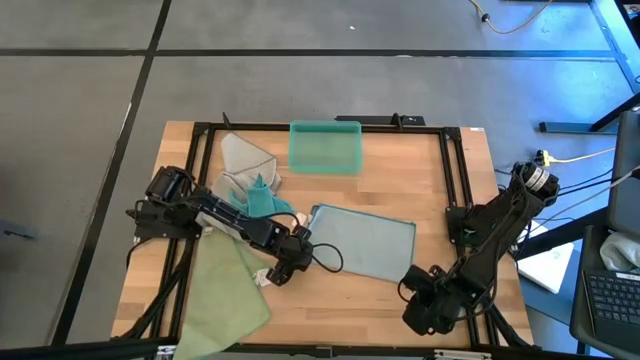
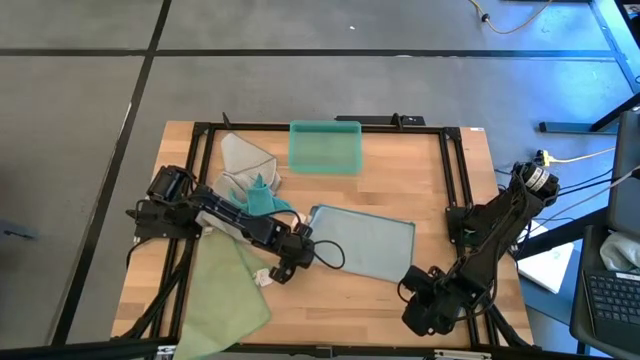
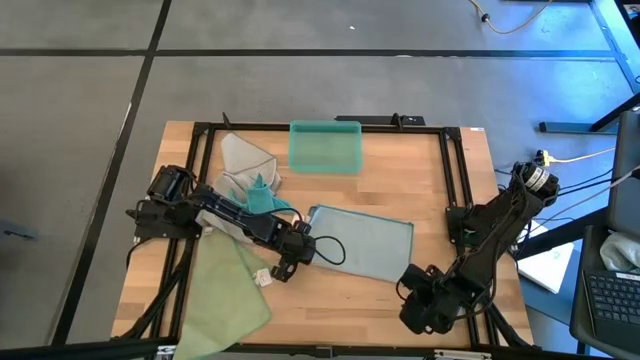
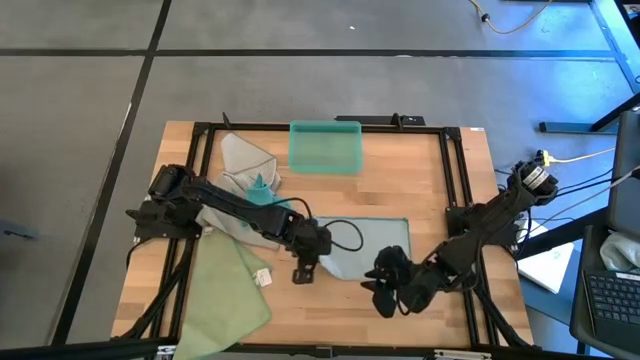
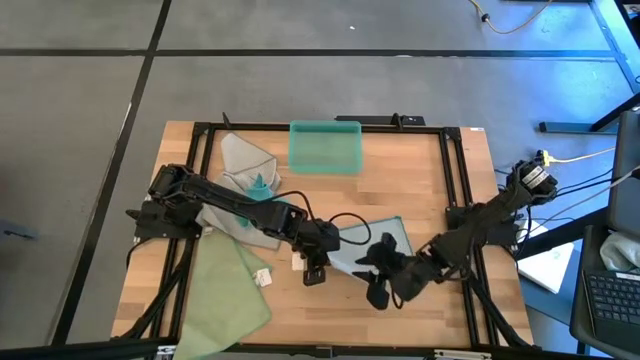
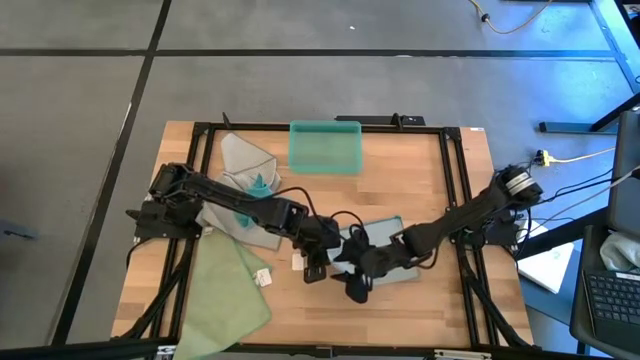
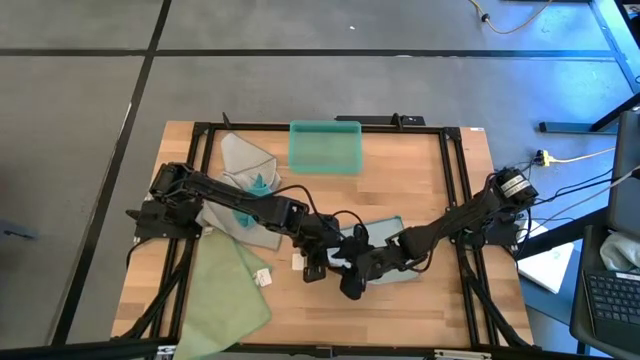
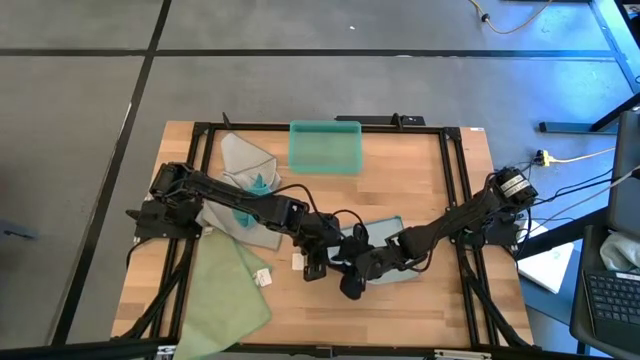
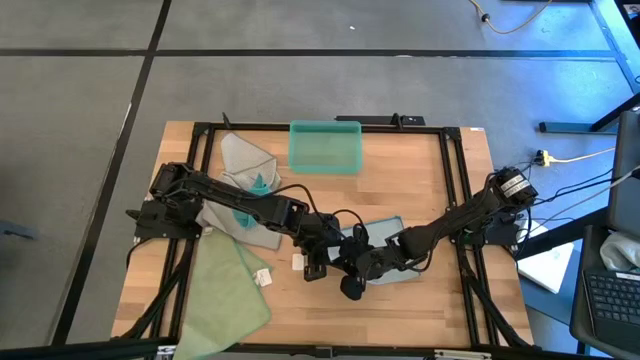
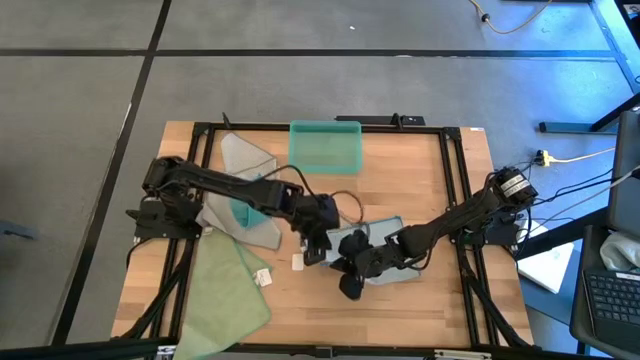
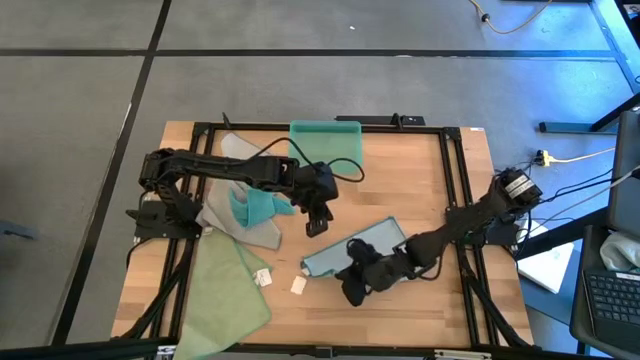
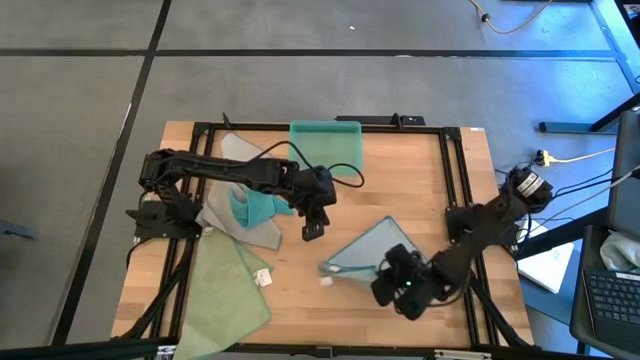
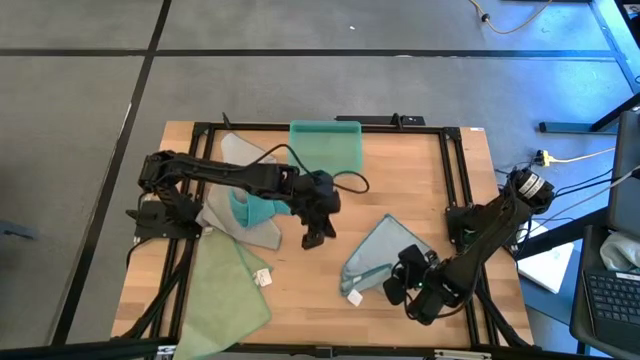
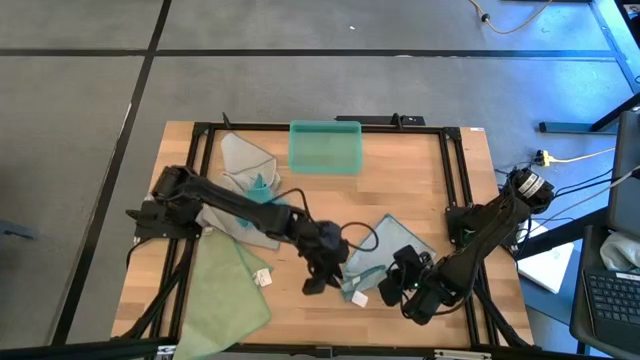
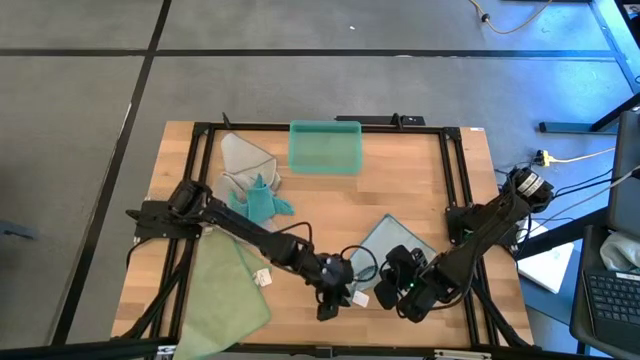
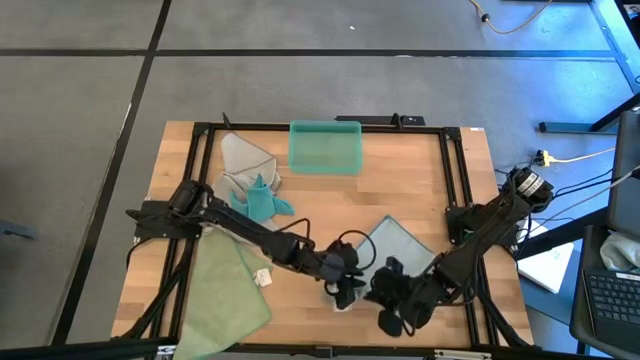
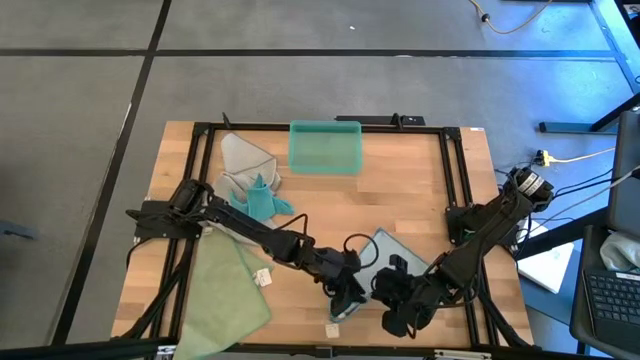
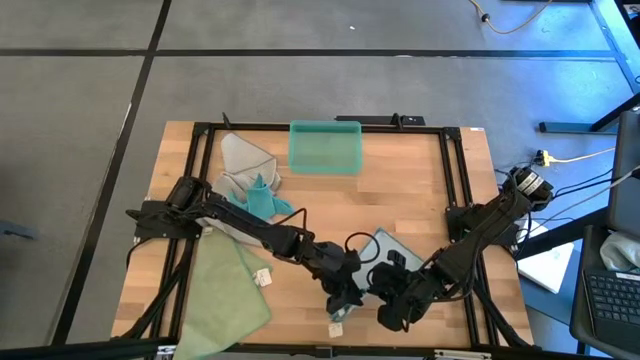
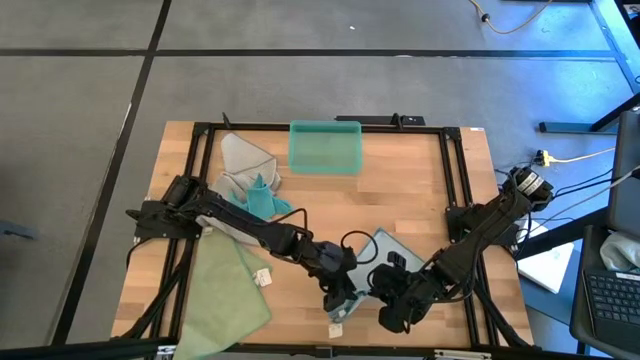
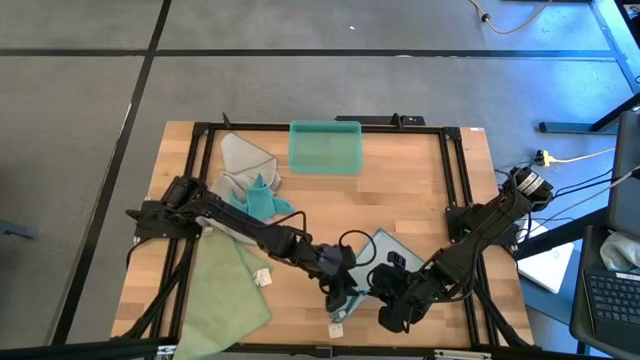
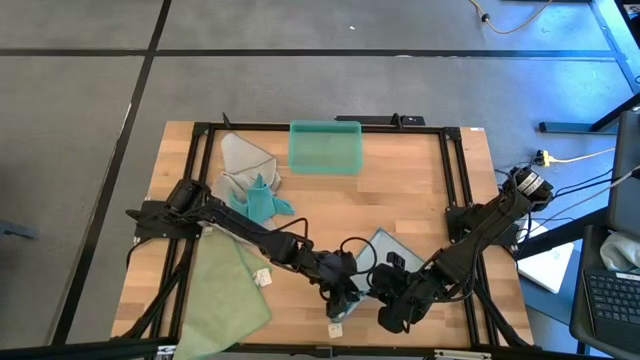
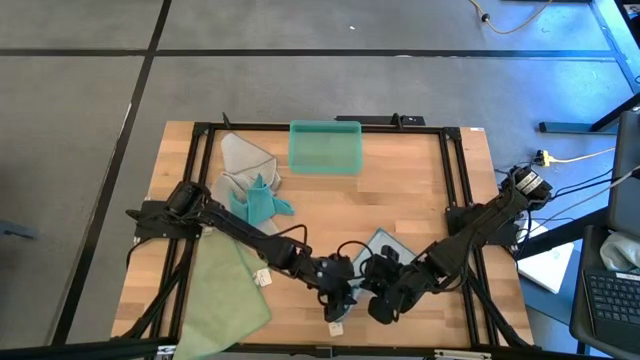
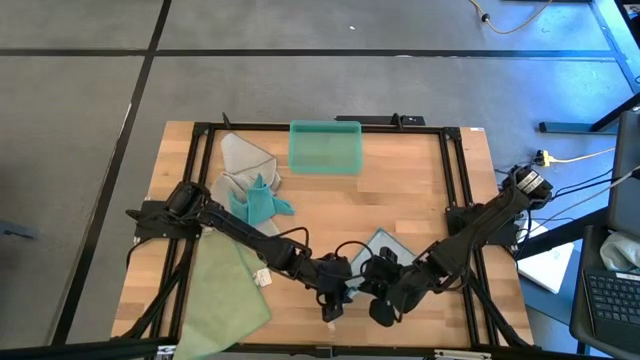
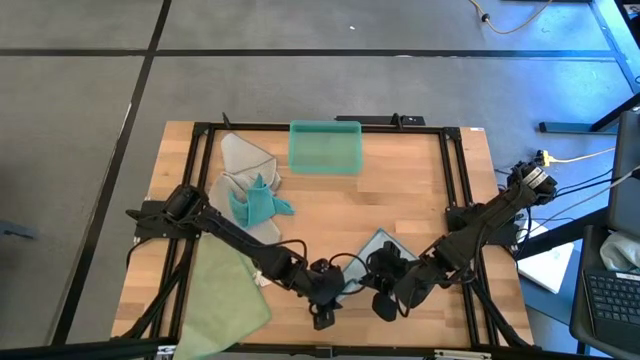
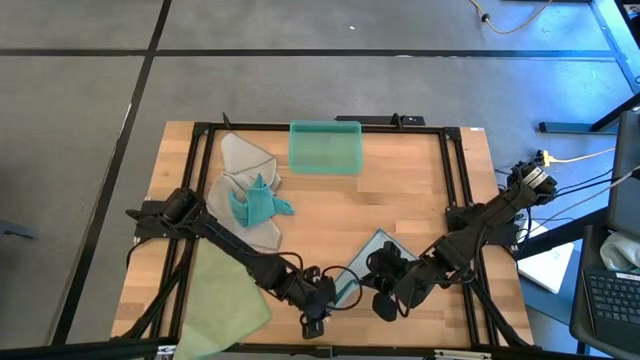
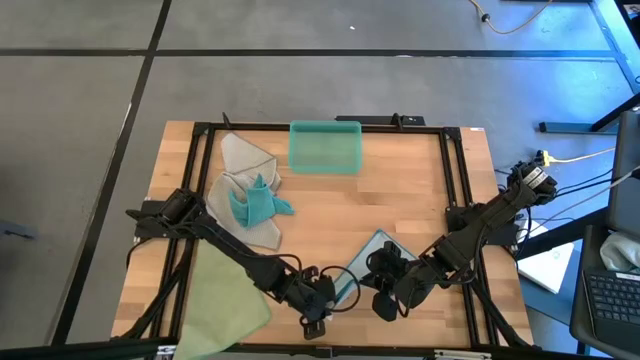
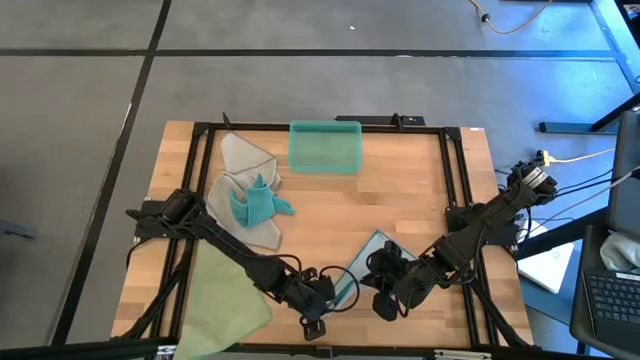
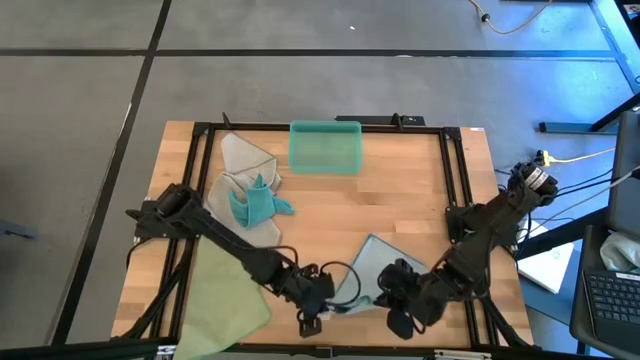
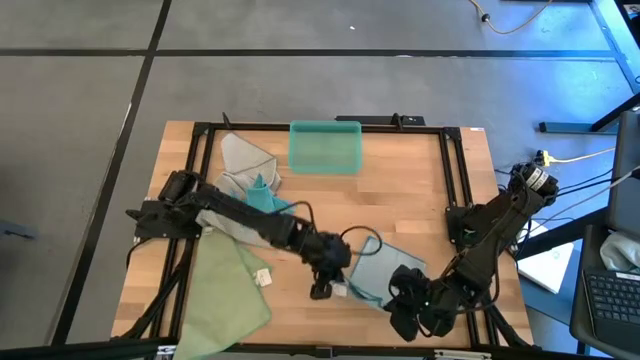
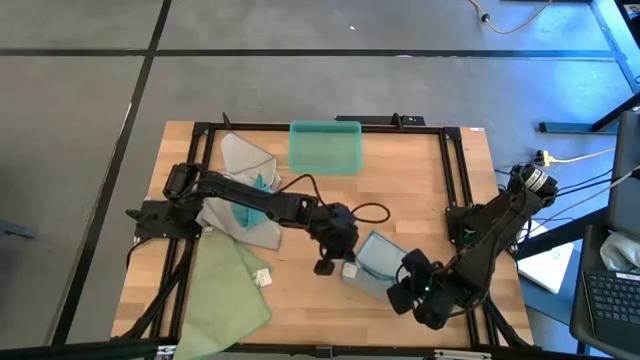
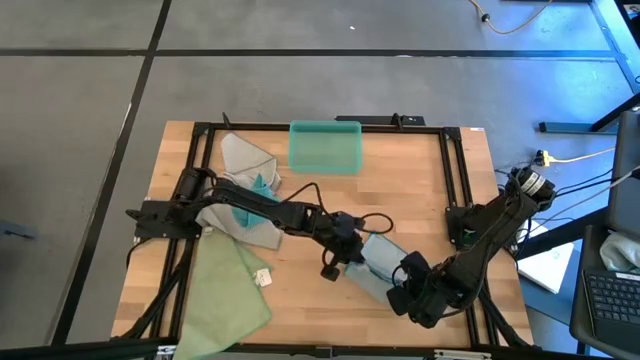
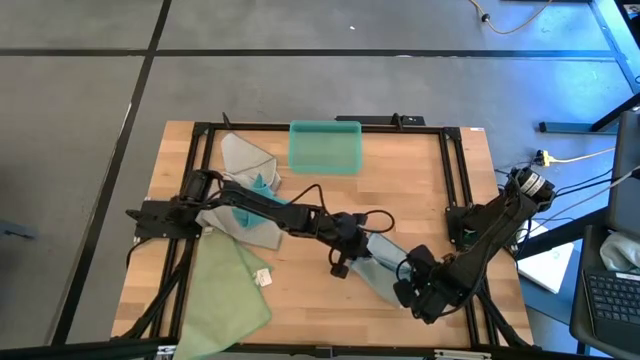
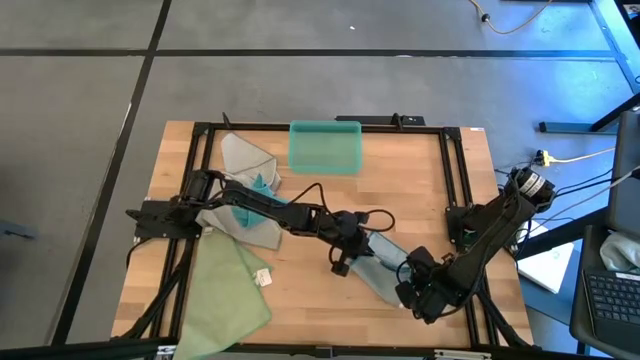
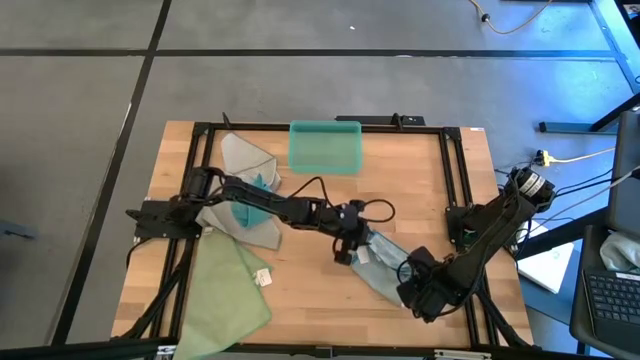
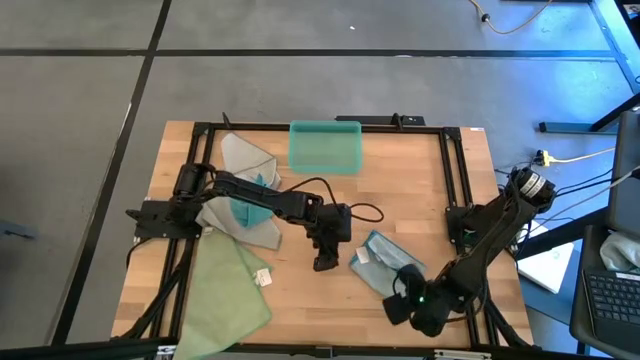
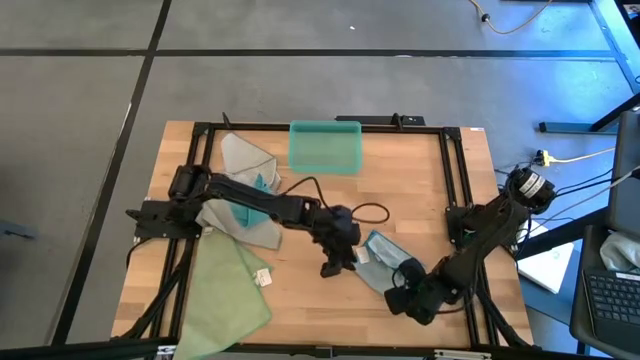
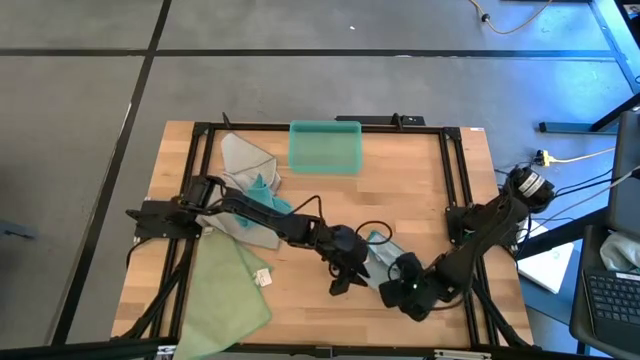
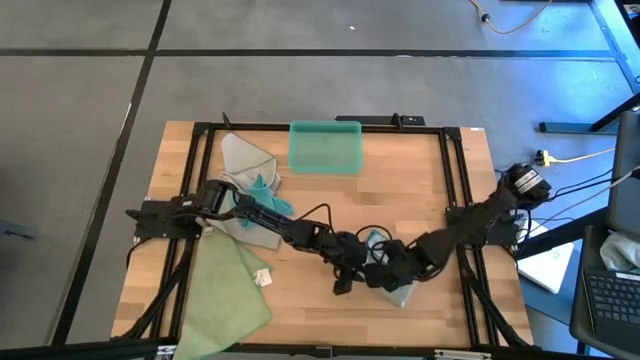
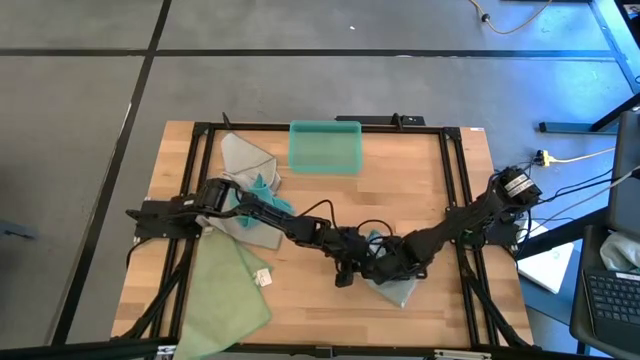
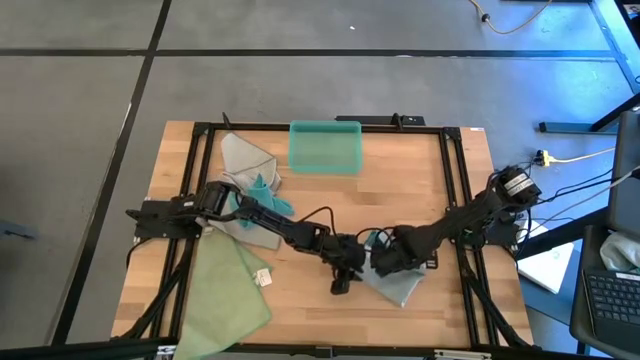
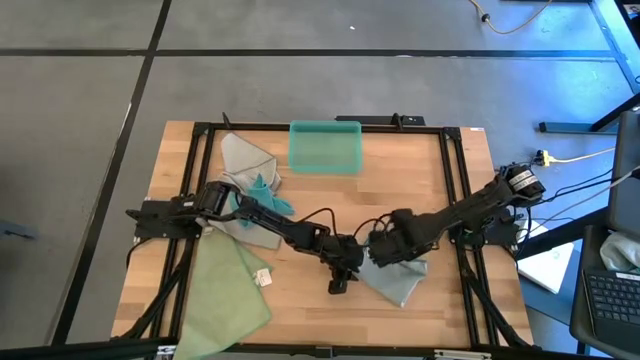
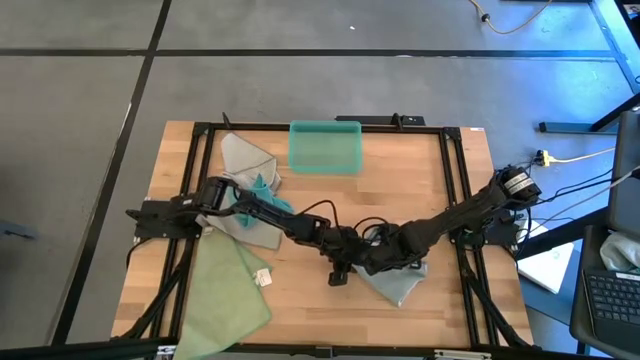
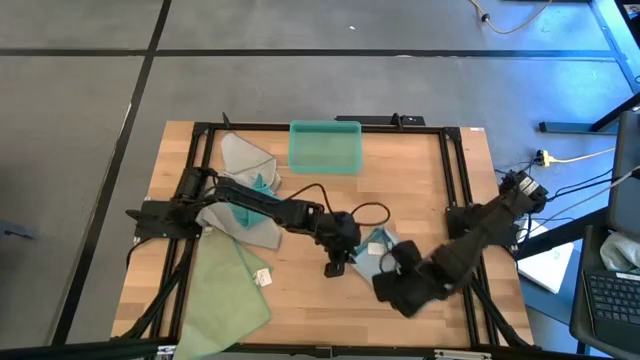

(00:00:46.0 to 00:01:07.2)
Task: Fold microfiber towels
Fold the light blue towel
